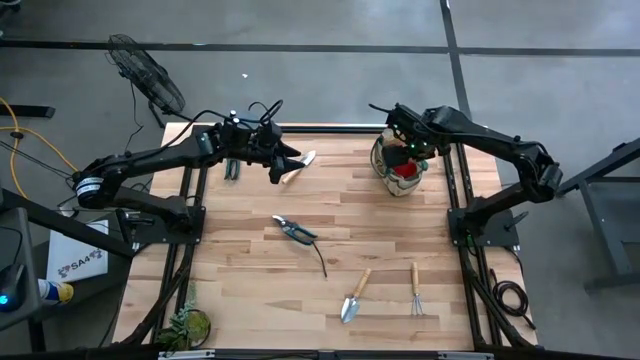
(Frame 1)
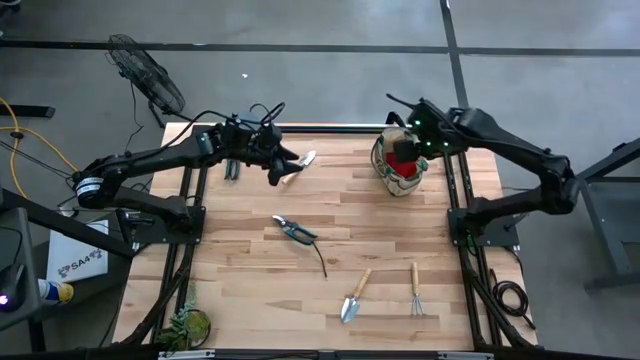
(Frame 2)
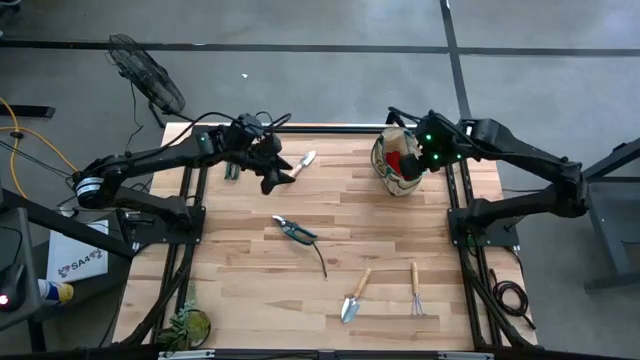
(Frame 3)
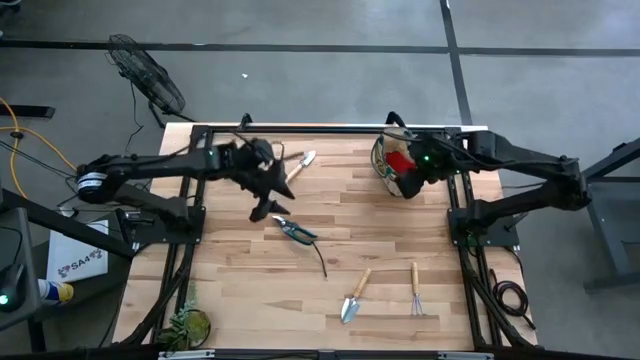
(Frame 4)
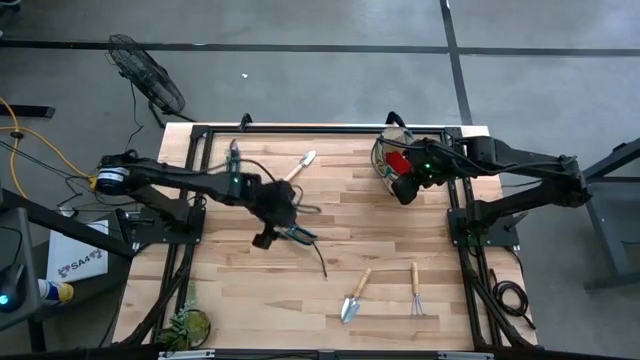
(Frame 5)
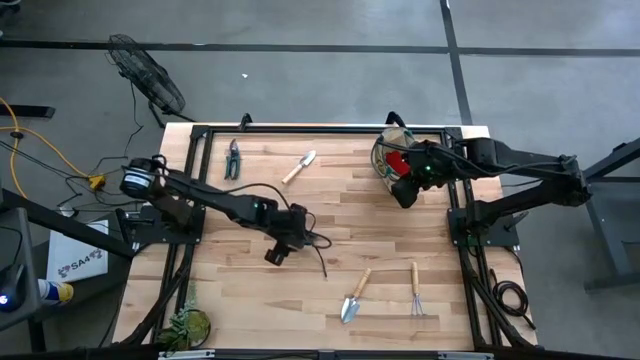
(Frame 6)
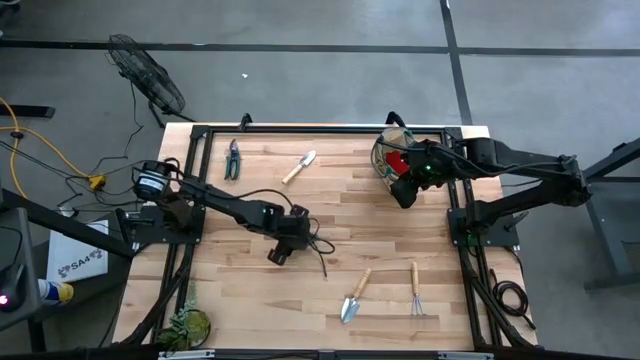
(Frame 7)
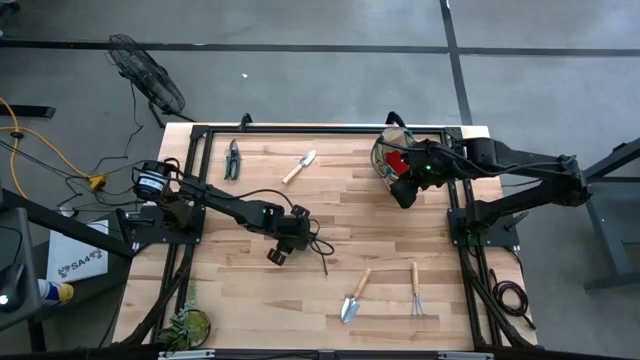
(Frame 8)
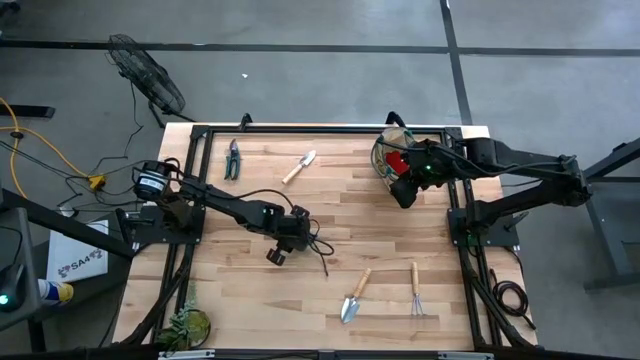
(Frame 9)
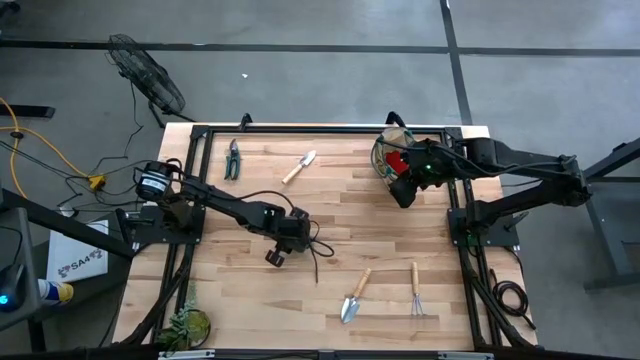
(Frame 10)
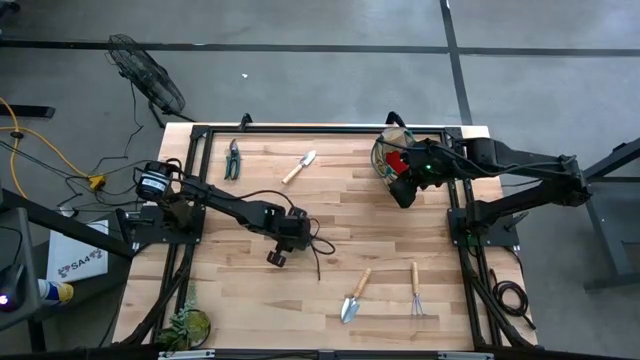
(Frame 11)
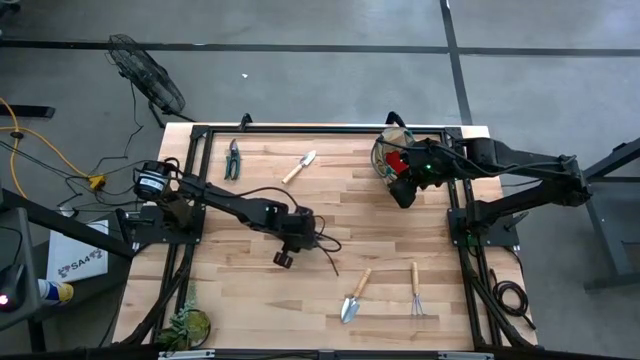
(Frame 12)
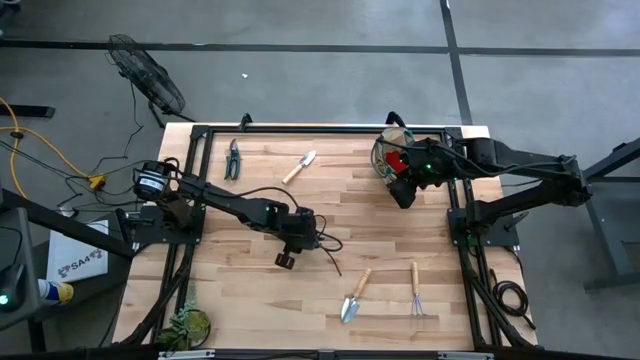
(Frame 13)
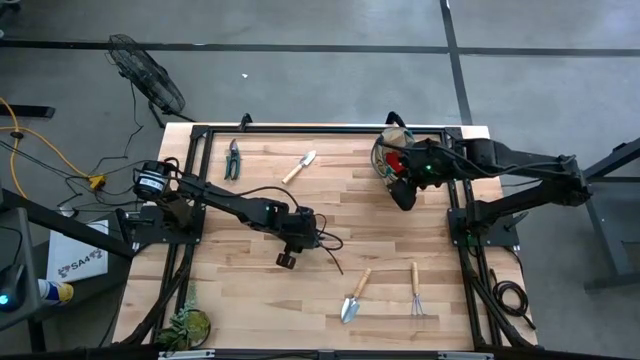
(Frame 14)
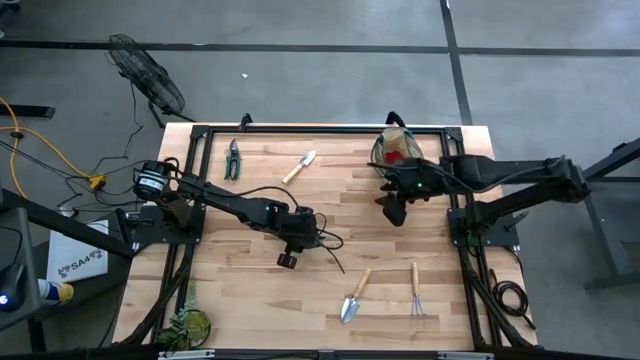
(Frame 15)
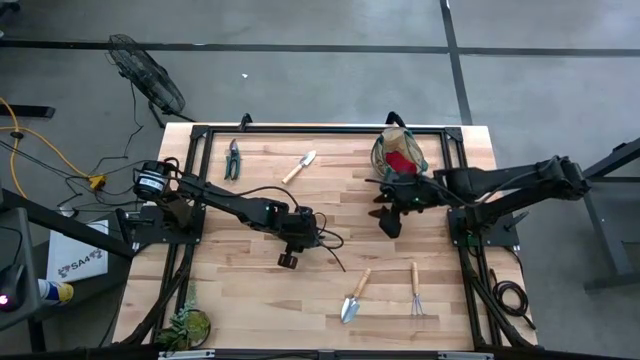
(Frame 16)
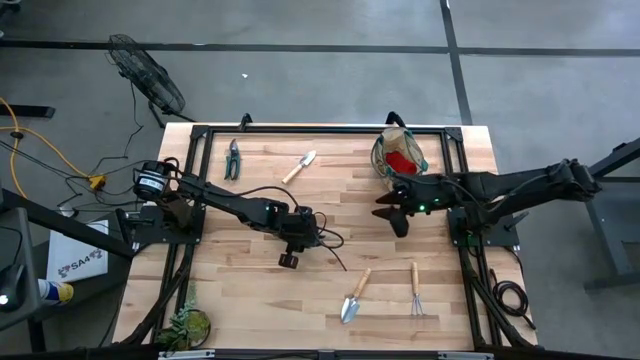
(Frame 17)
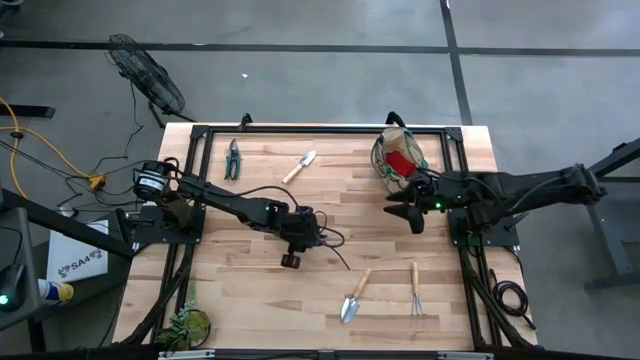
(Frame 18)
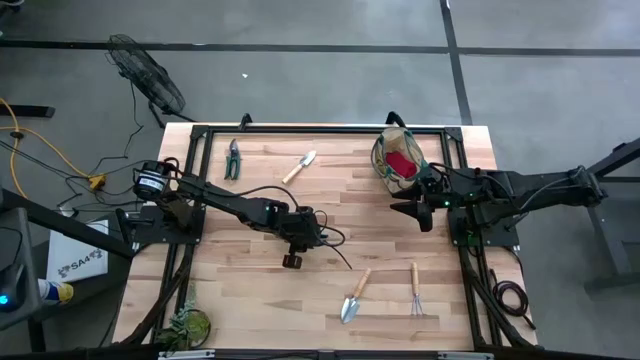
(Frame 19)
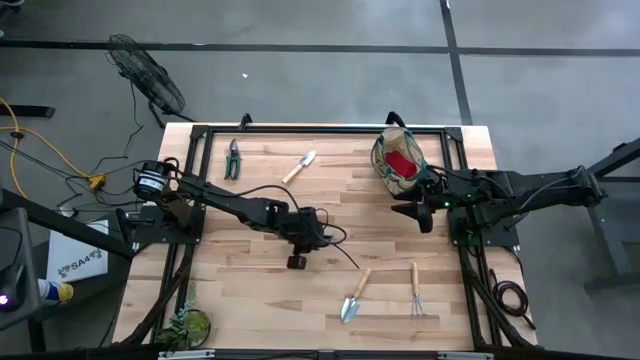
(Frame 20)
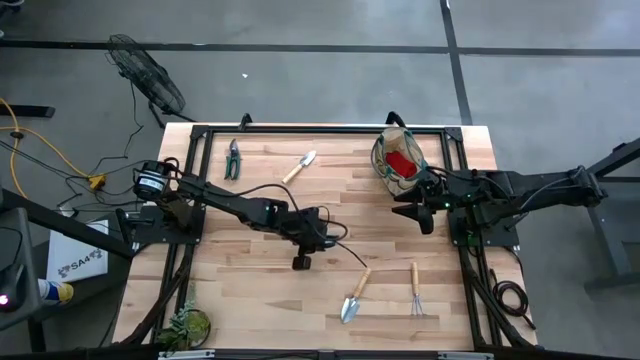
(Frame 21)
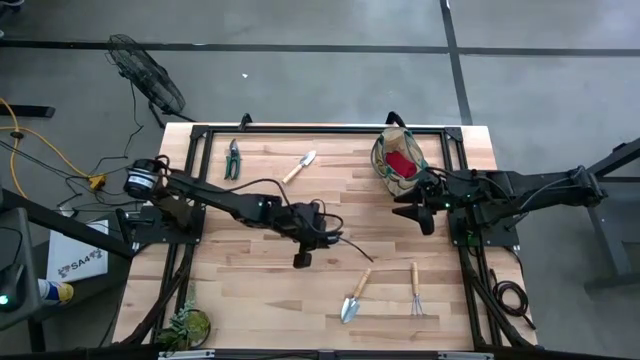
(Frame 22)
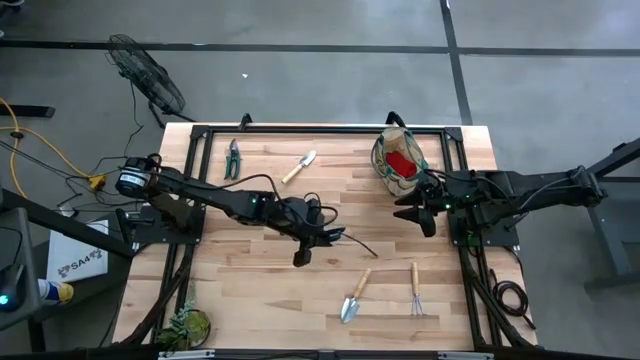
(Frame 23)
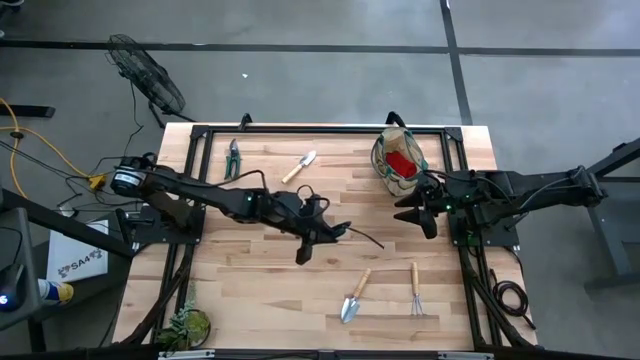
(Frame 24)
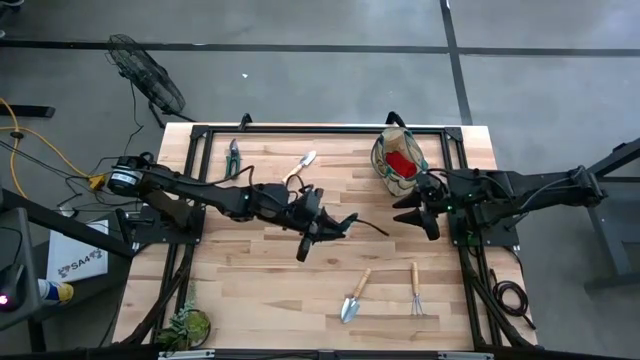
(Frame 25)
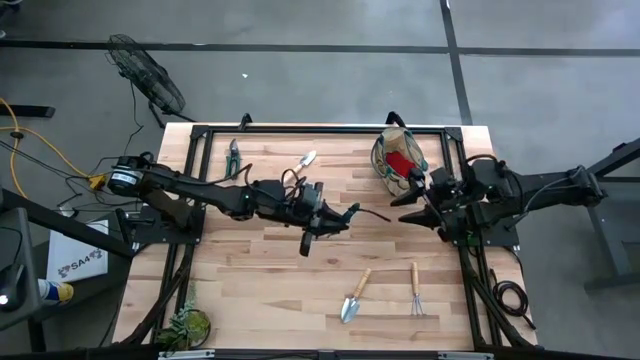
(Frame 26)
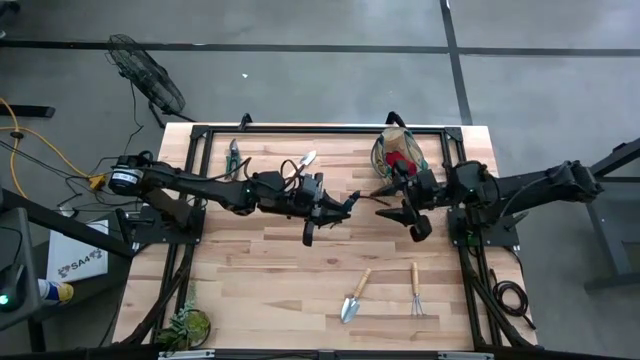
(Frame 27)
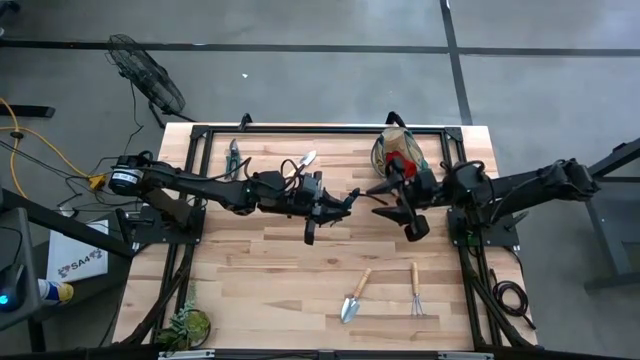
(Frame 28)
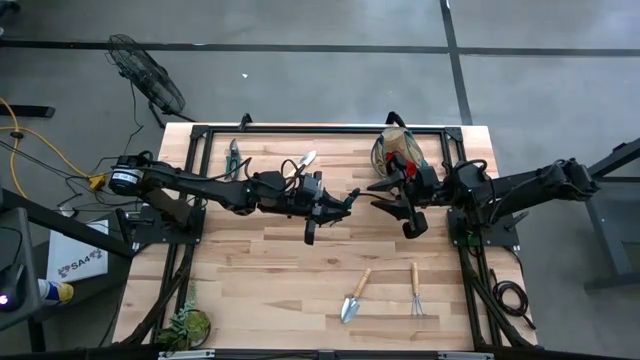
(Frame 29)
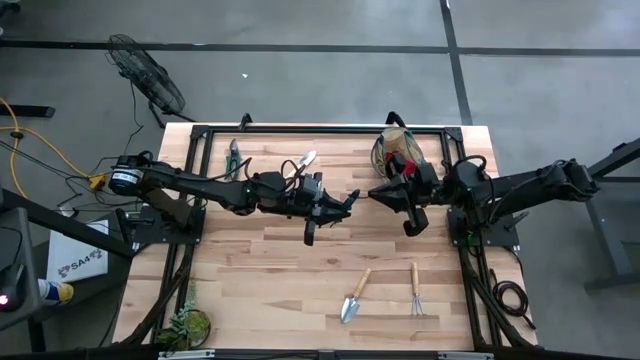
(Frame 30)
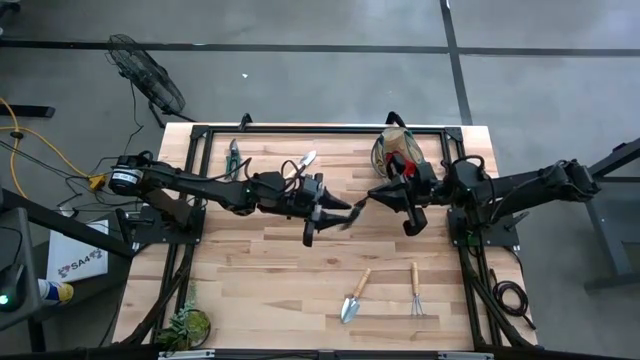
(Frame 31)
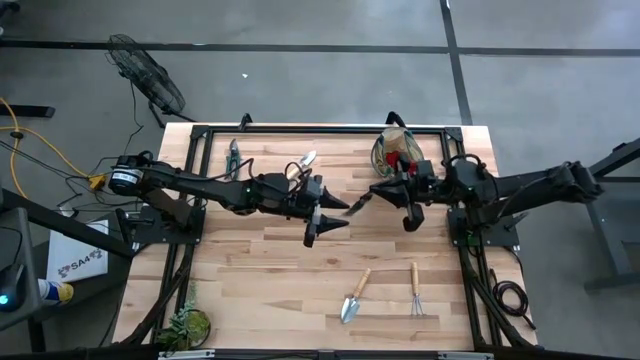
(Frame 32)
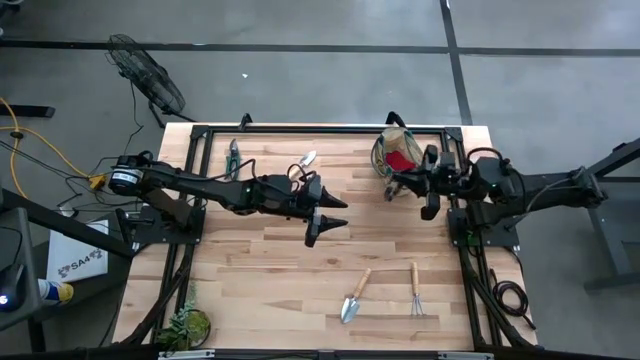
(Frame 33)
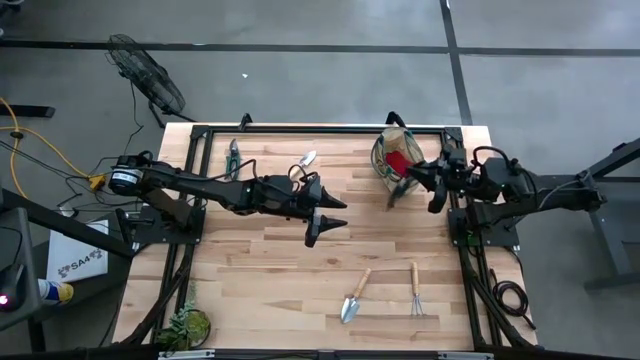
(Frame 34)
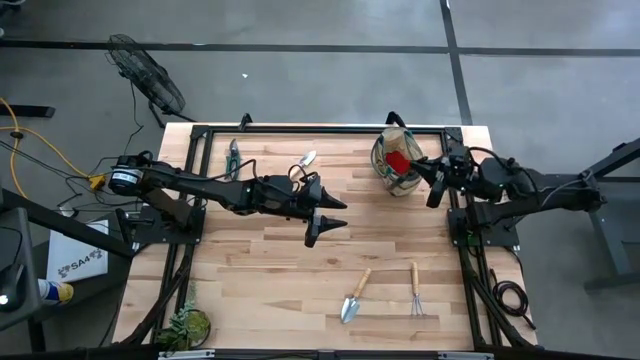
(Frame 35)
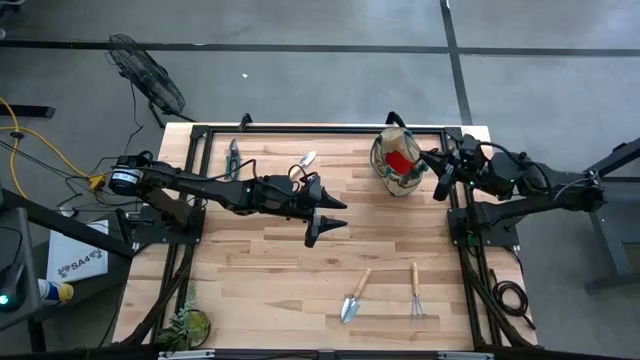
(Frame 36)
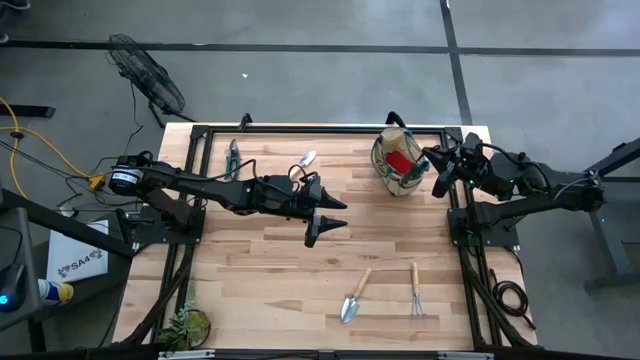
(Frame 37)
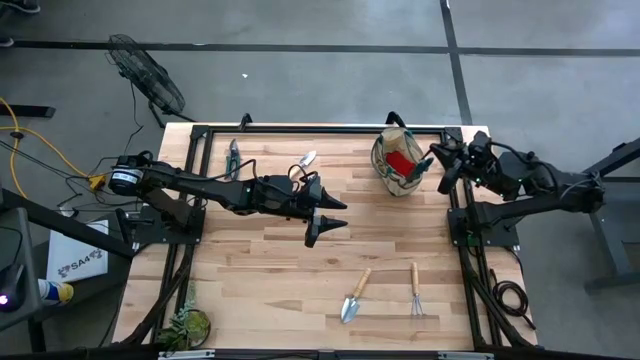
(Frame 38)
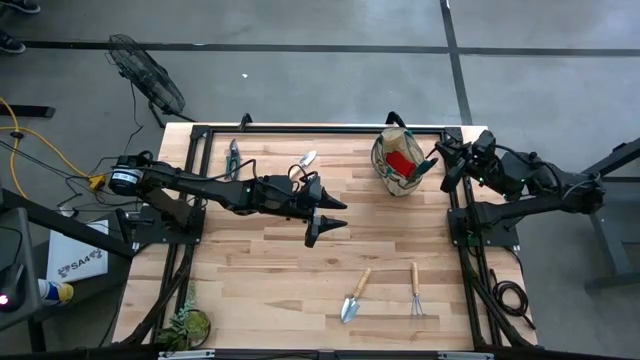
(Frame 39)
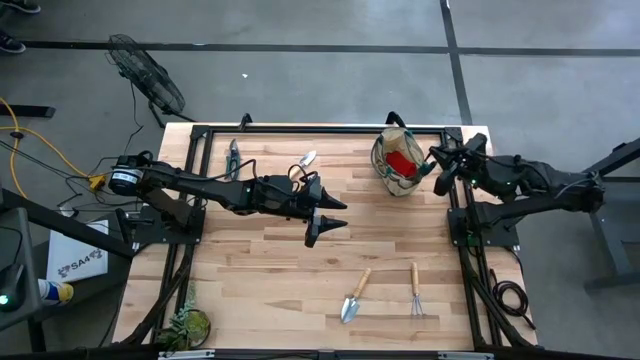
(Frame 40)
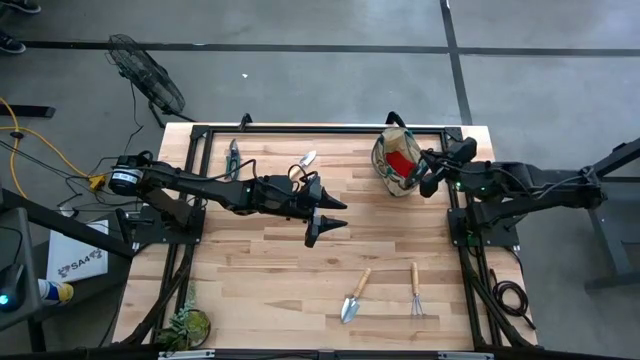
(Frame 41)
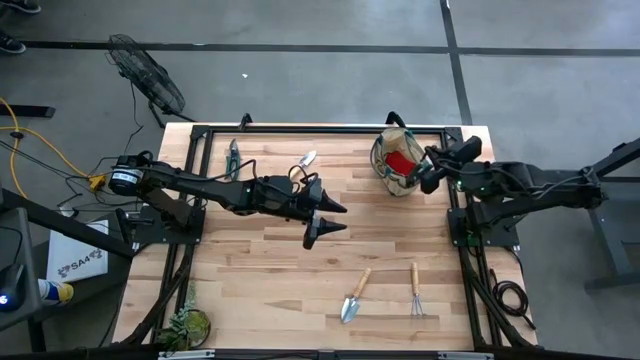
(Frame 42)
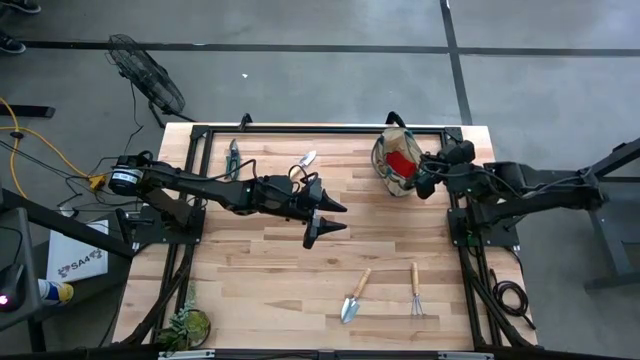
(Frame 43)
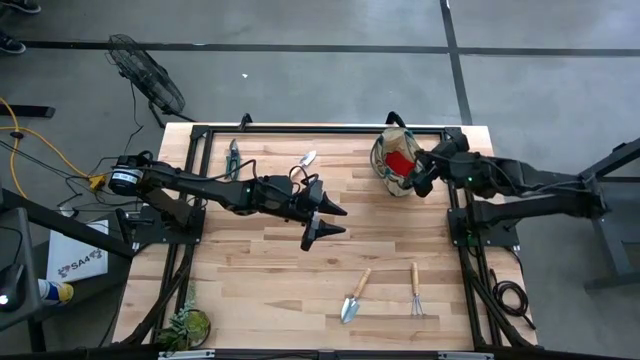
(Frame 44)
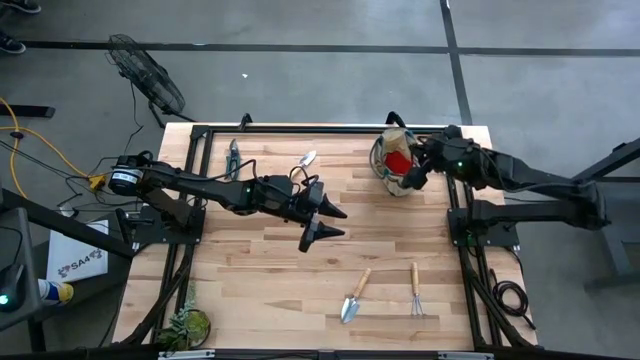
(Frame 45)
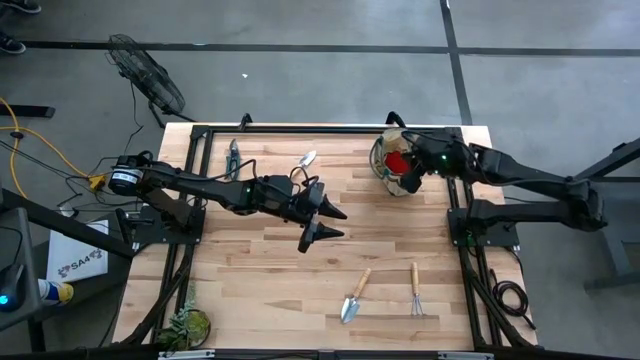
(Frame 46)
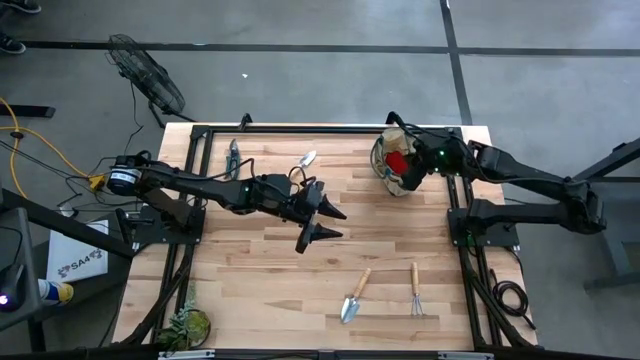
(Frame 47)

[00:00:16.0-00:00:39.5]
Task: Pick & Place Garden tools in Gardening bag
Put the bottom shear scissor into the gardening bag
